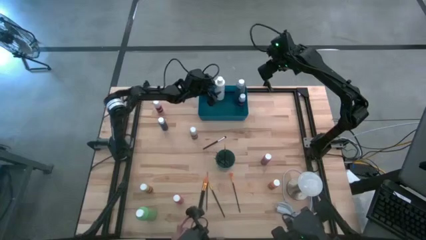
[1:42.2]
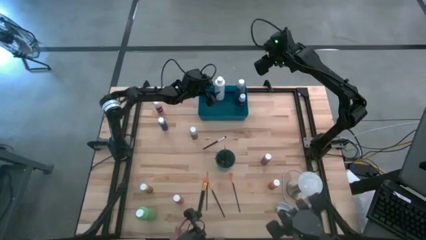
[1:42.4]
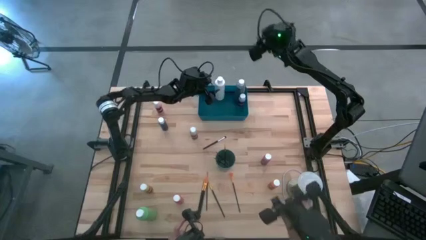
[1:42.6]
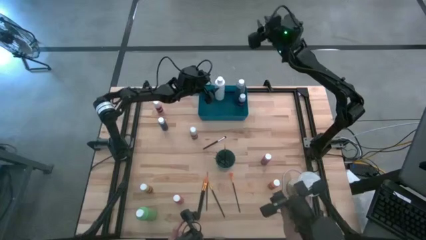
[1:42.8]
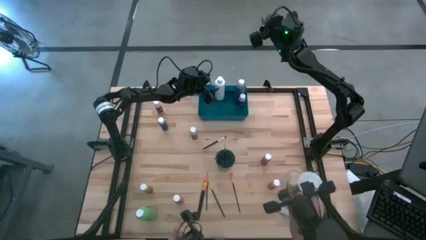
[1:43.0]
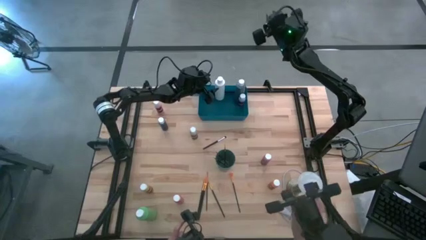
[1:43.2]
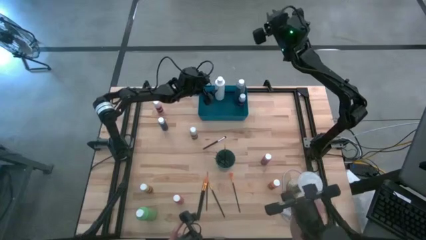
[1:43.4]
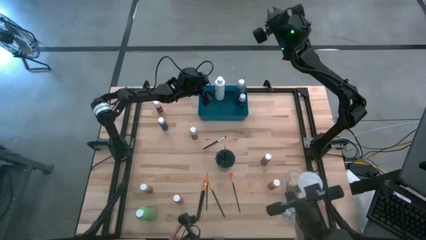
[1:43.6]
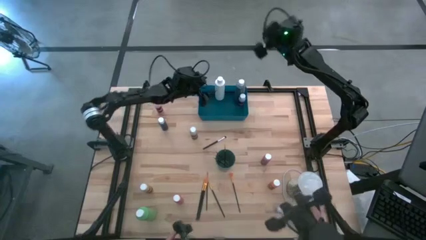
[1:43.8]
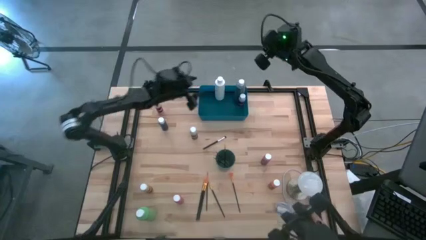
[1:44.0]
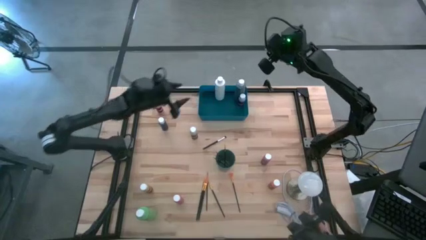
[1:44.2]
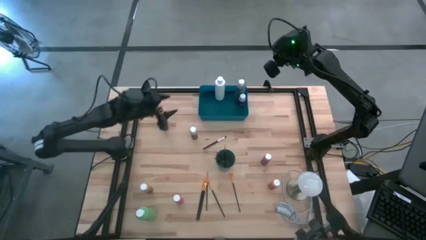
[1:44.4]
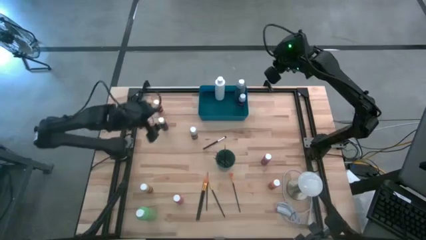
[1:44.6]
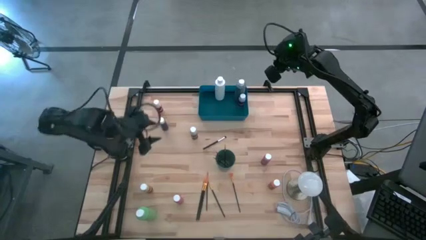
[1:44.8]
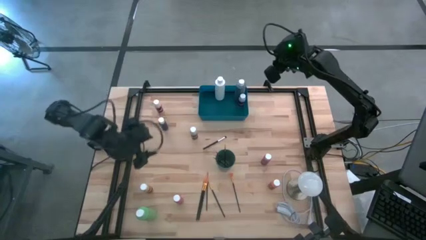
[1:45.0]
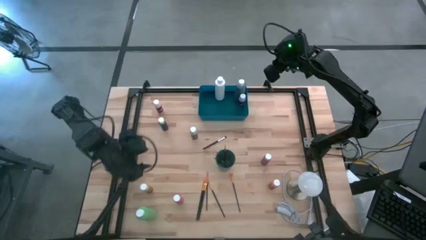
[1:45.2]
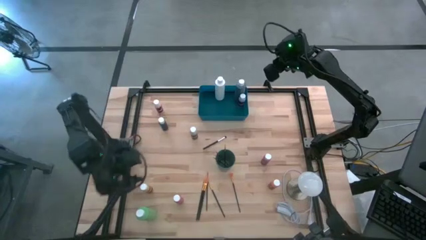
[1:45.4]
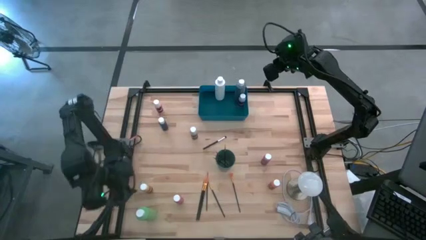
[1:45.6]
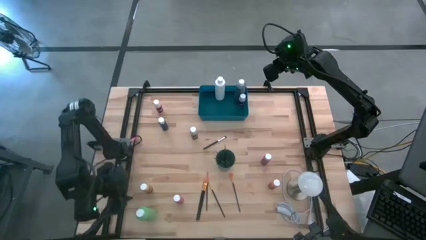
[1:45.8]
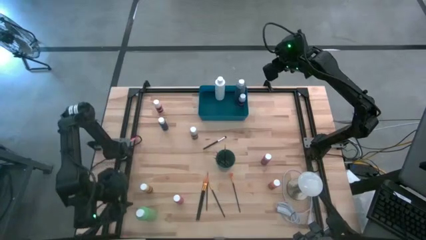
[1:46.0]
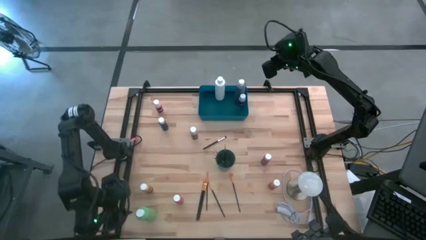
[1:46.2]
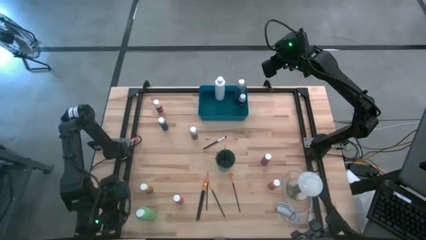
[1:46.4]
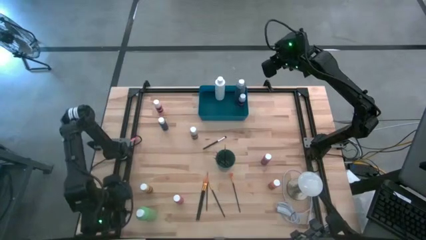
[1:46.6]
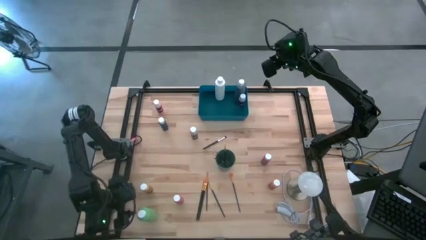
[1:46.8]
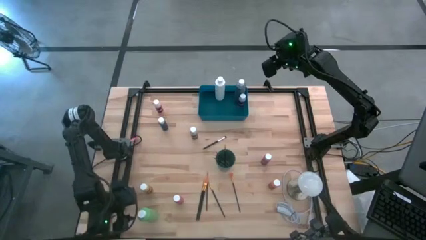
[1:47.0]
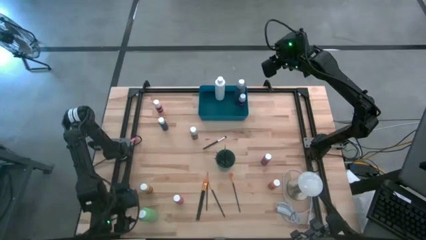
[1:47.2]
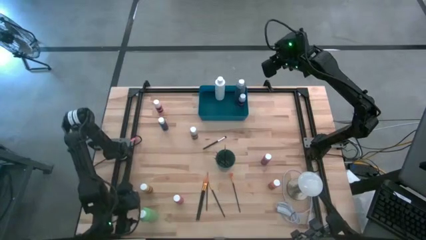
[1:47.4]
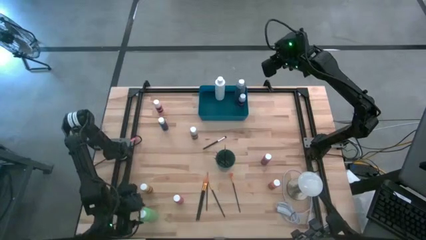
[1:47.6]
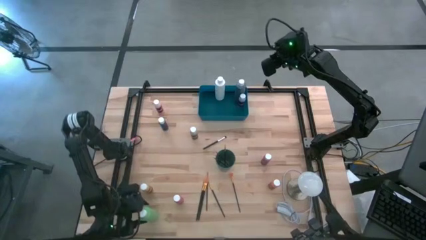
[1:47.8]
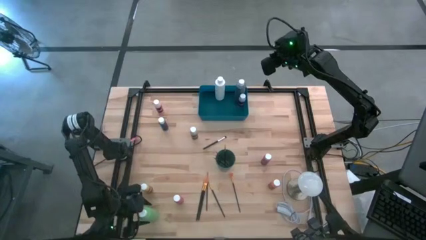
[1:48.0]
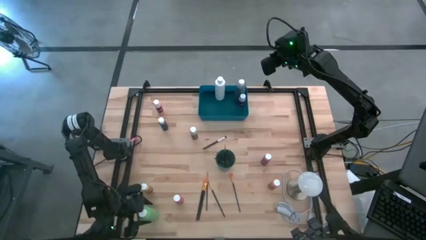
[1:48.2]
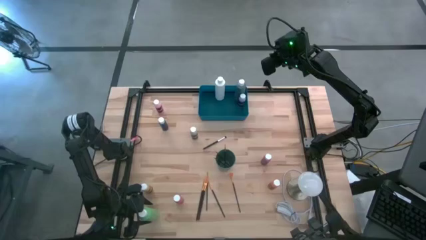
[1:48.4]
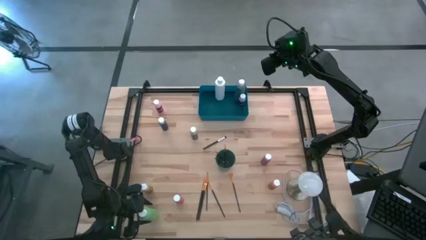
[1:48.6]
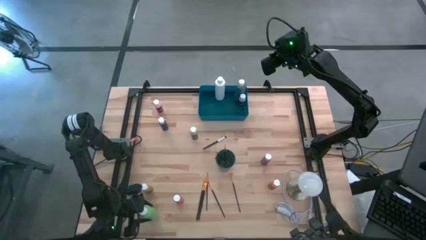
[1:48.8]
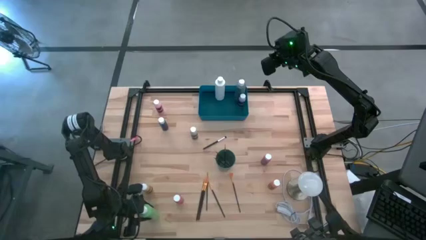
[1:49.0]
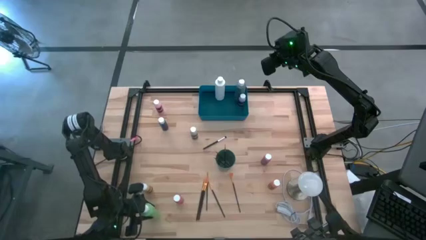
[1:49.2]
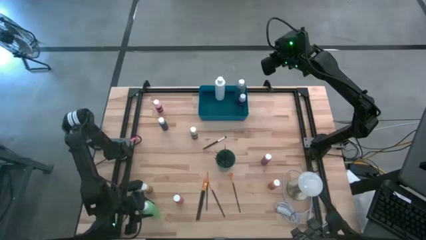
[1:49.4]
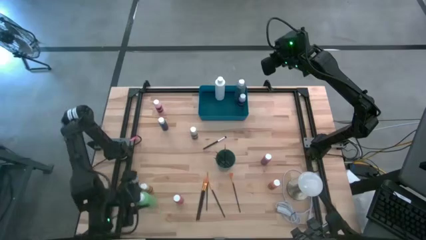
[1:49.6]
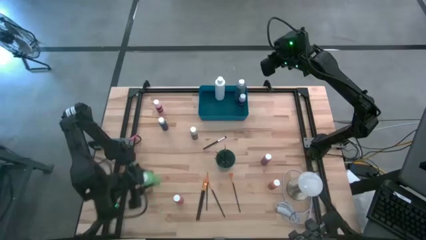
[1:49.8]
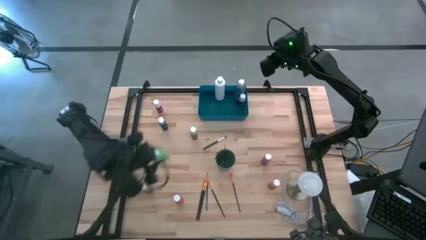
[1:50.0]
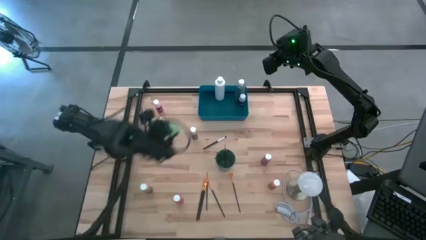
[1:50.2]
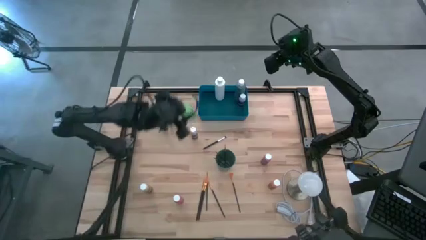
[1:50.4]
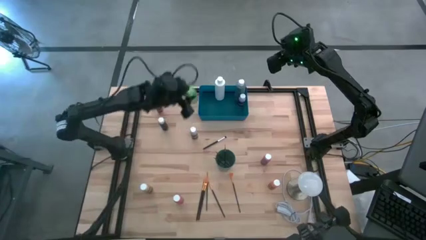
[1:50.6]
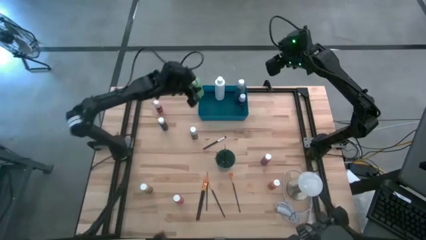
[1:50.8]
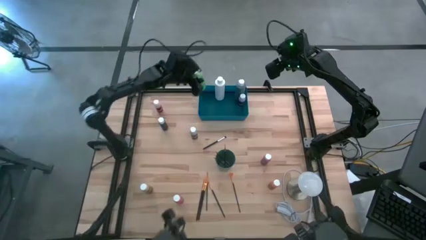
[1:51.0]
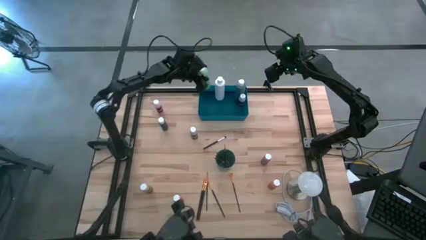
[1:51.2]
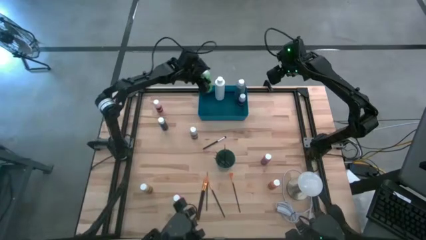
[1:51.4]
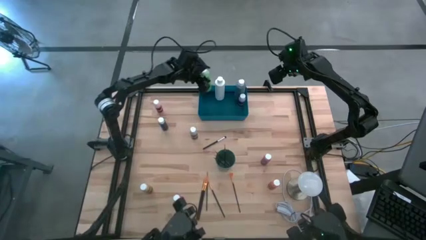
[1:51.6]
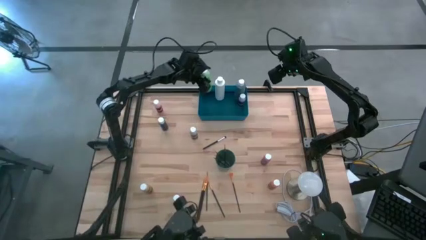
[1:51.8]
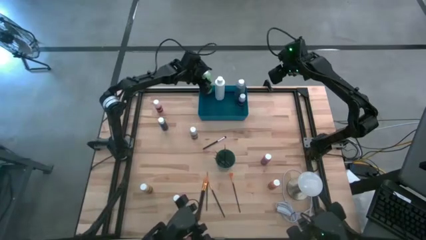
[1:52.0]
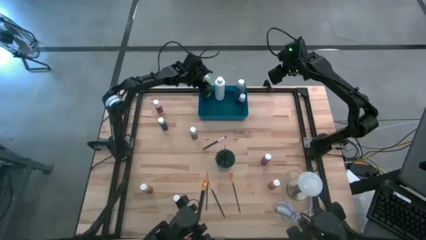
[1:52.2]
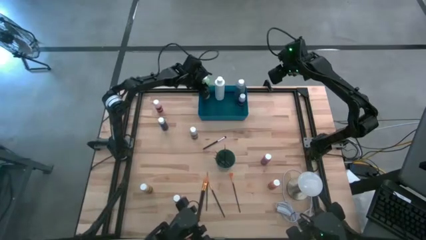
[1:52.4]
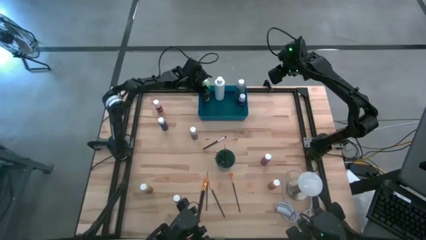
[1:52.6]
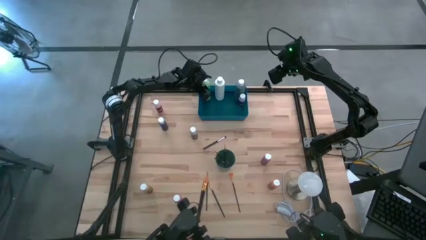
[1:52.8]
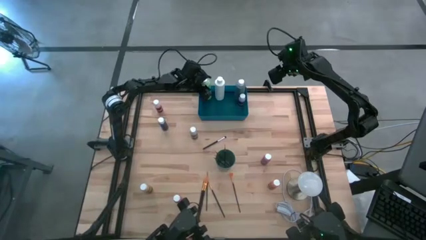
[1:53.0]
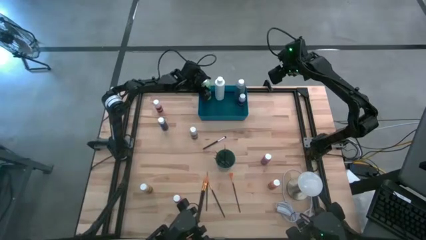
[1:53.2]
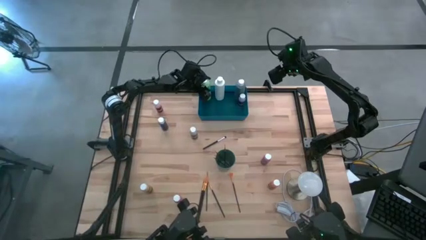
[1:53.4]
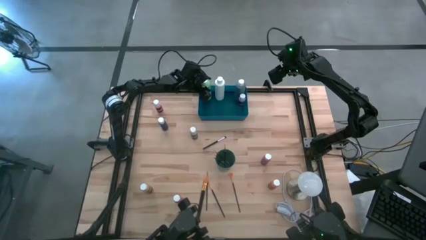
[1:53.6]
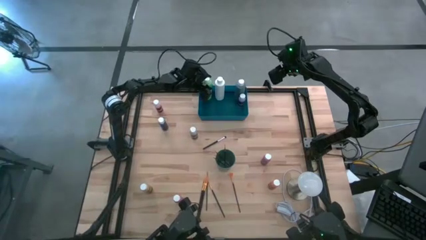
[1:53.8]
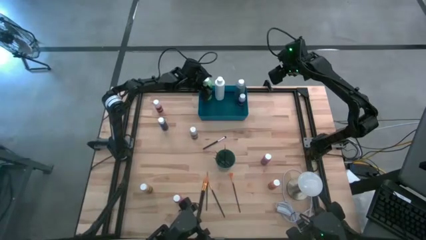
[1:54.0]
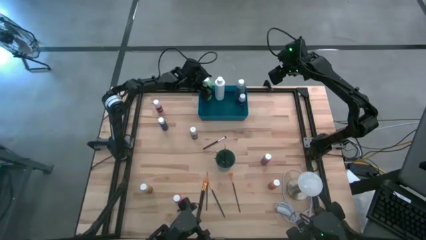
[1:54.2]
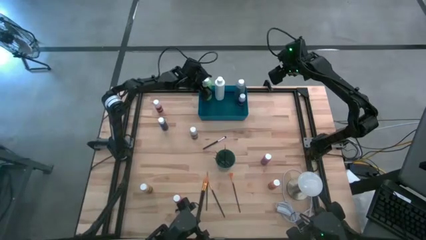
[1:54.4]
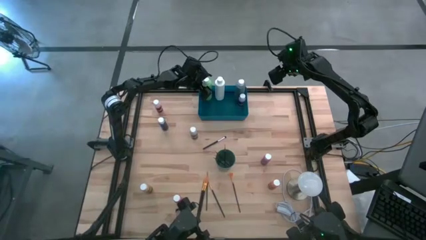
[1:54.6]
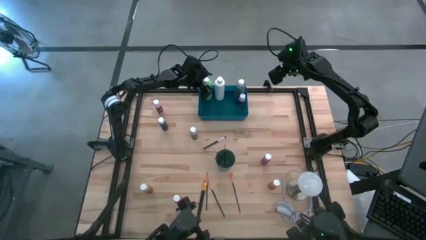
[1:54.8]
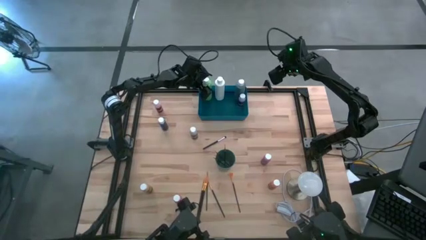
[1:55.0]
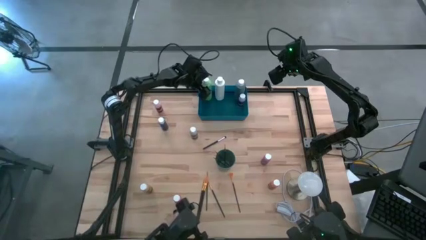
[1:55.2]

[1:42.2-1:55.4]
Task: Pick & Place Paint Supplies
Put the green paint bottle into the blue bin
